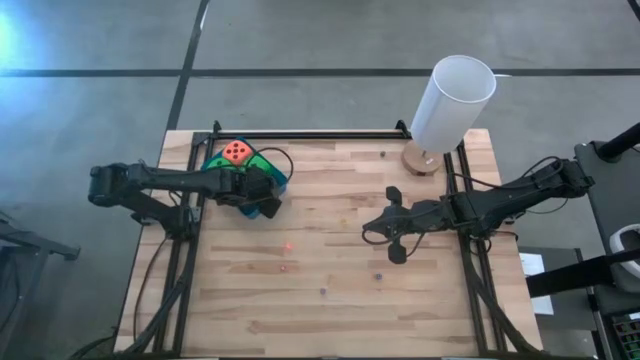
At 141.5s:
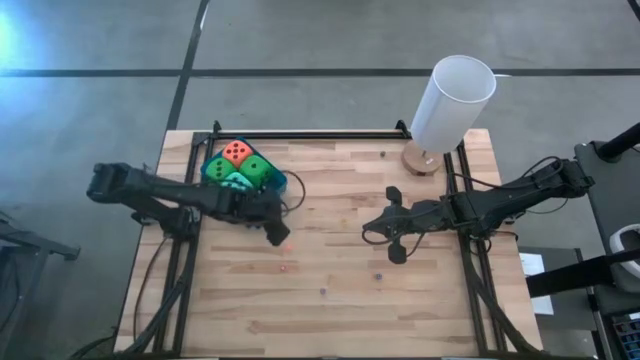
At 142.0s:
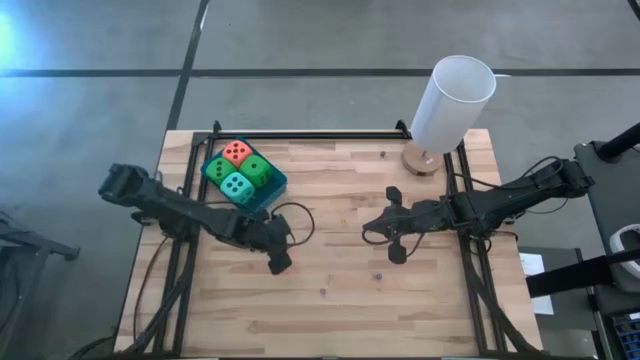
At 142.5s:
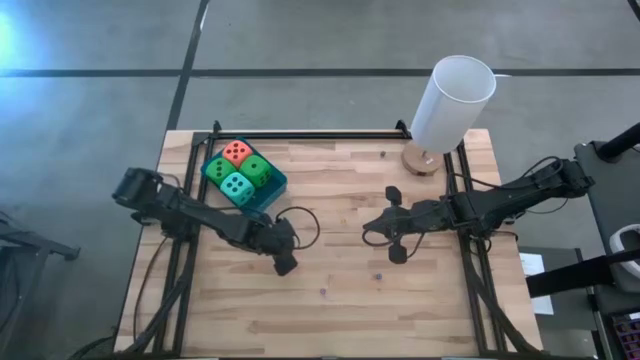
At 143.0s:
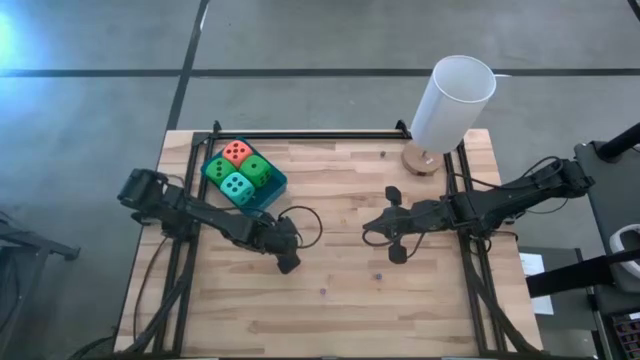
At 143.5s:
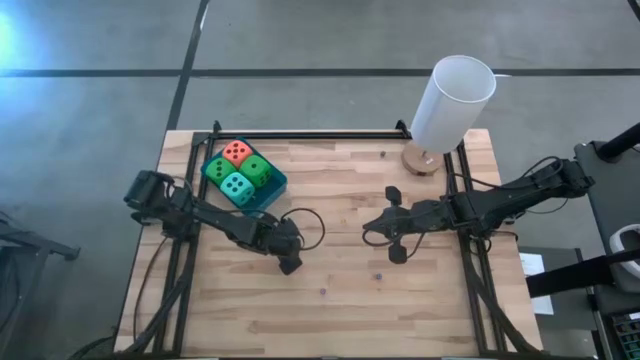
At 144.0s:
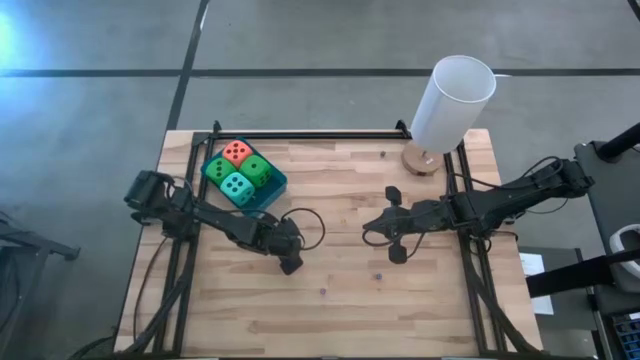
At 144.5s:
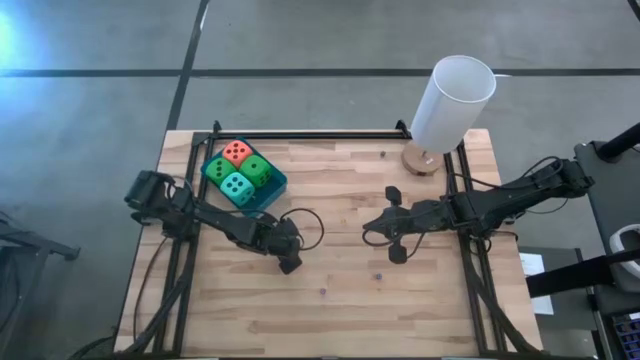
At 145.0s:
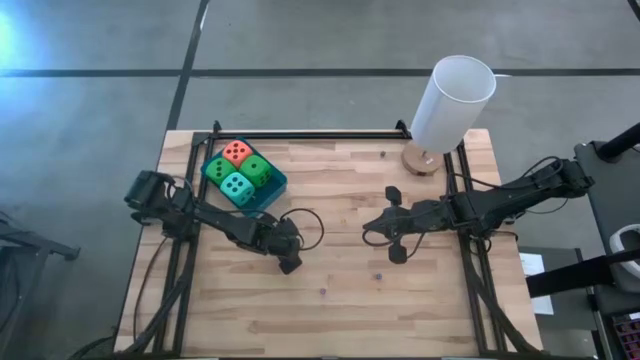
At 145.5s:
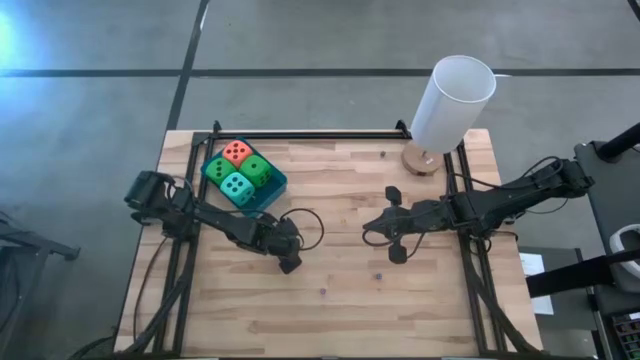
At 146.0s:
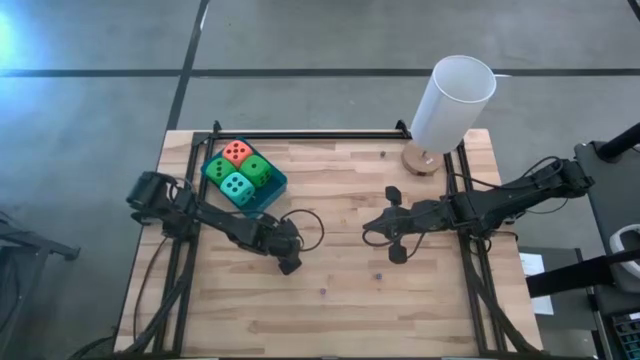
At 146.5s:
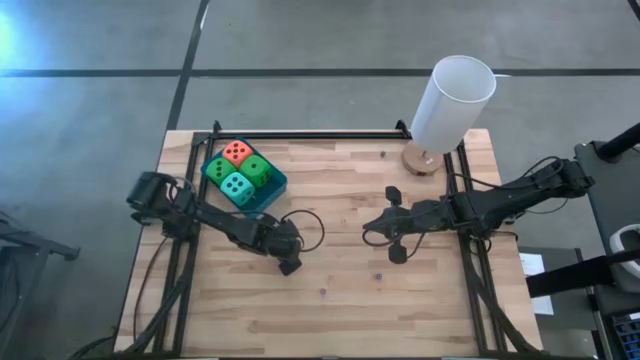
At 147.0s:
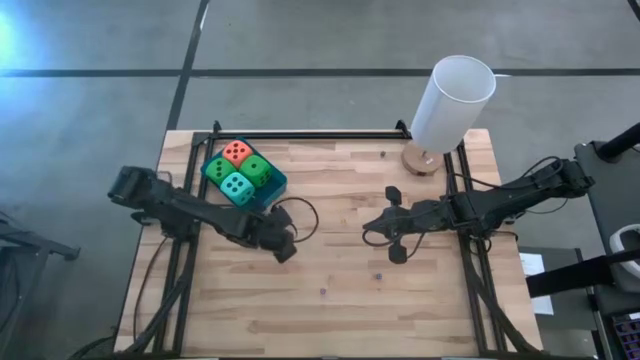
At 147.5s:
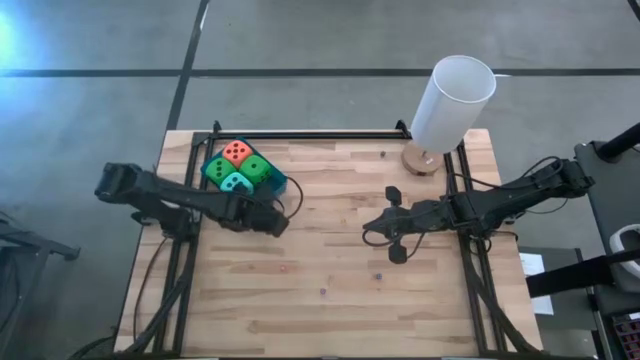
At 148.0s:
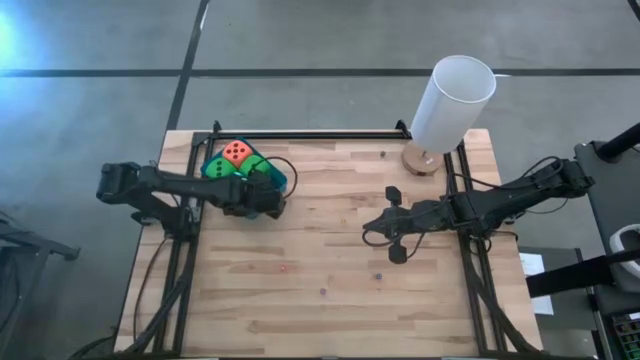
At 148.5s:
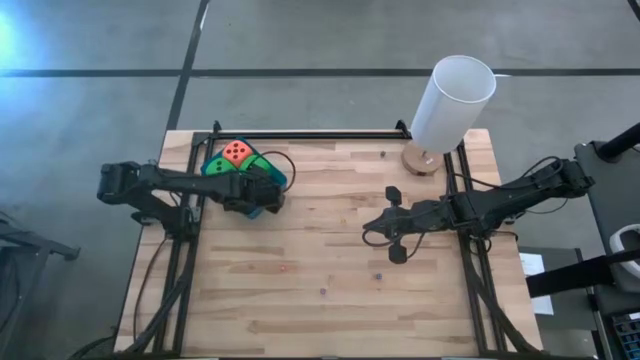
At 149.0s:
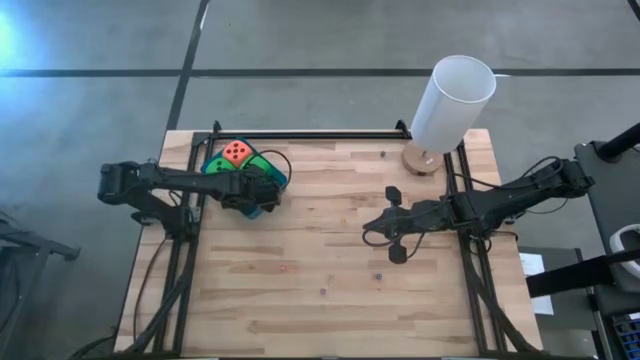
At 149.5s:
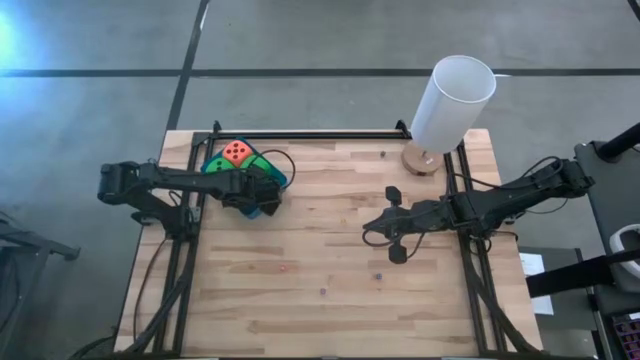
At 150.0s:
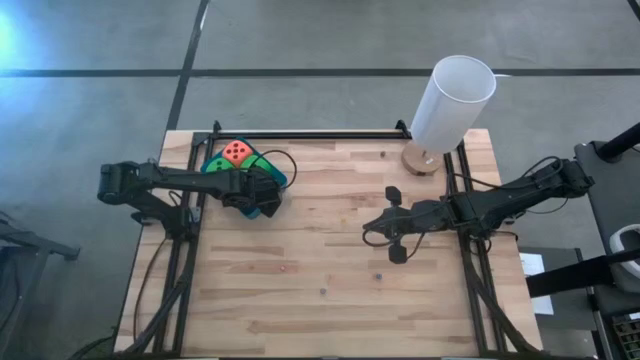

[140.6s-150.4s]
Task: Pick & Place Dice
Put the small orange dice into the blue bin

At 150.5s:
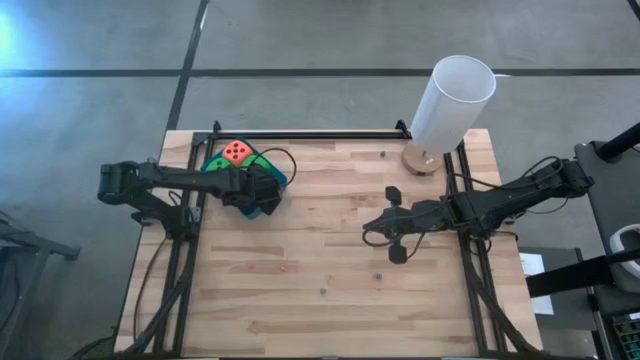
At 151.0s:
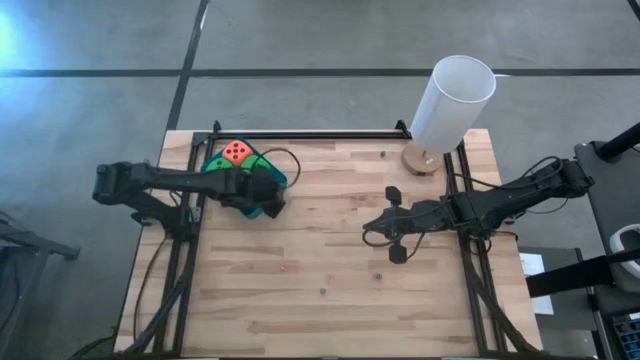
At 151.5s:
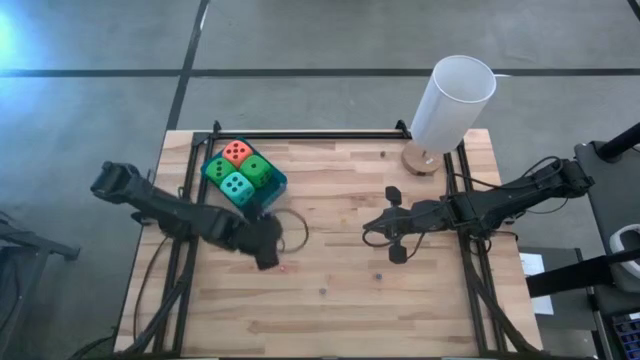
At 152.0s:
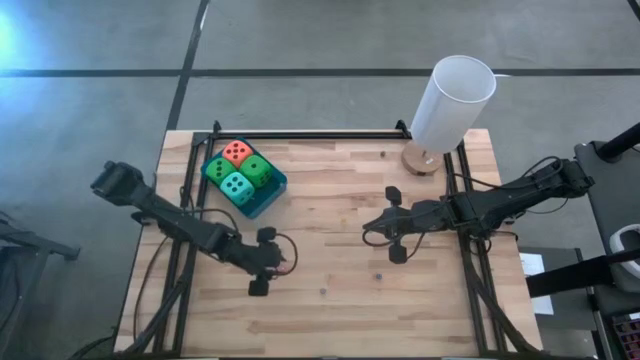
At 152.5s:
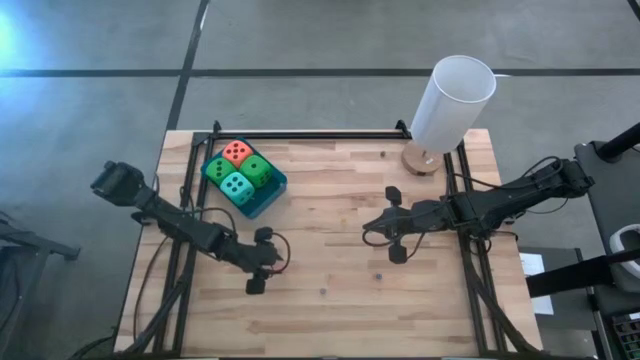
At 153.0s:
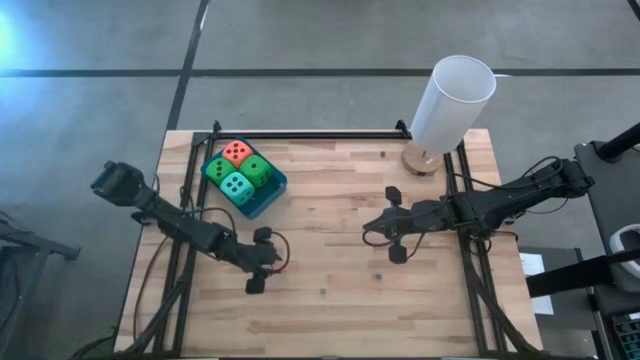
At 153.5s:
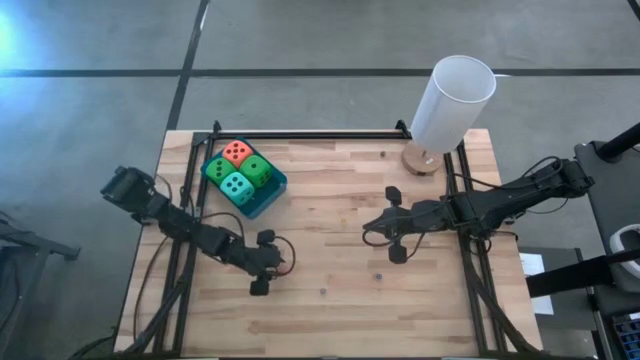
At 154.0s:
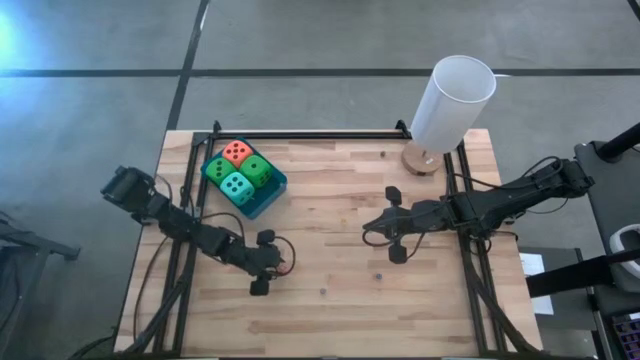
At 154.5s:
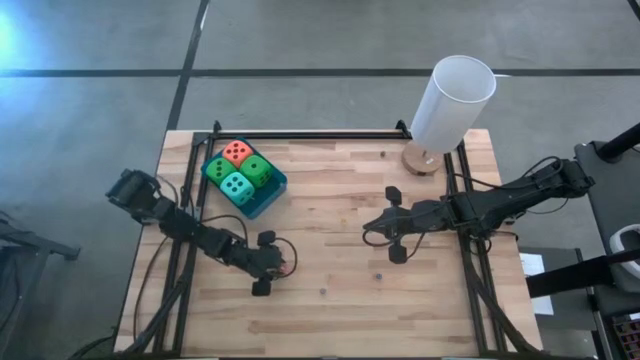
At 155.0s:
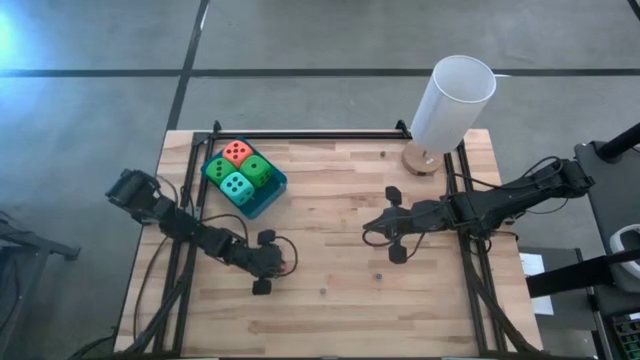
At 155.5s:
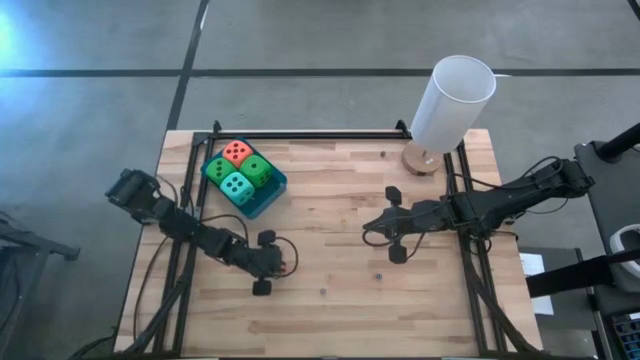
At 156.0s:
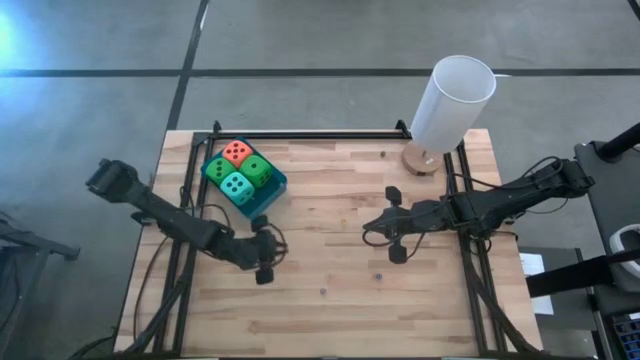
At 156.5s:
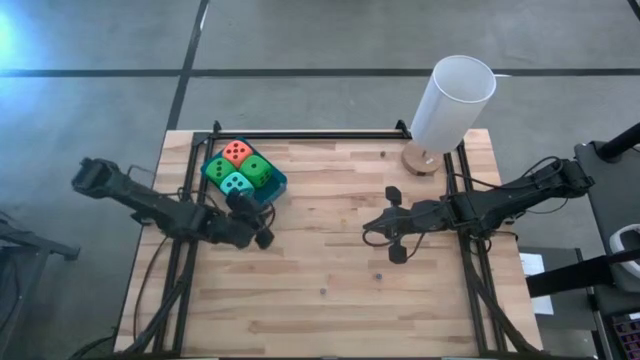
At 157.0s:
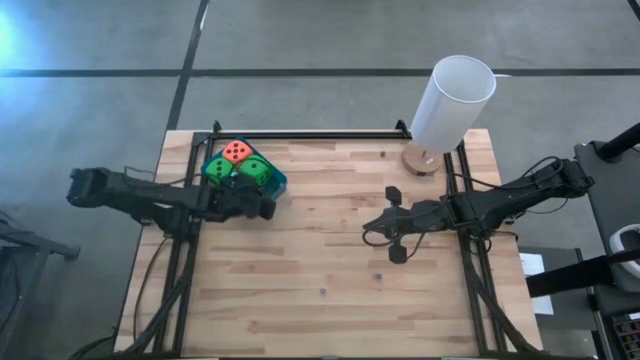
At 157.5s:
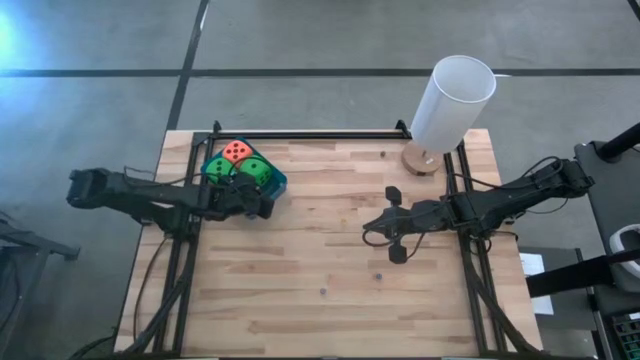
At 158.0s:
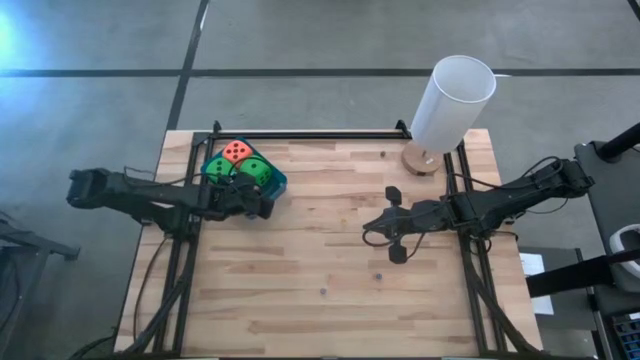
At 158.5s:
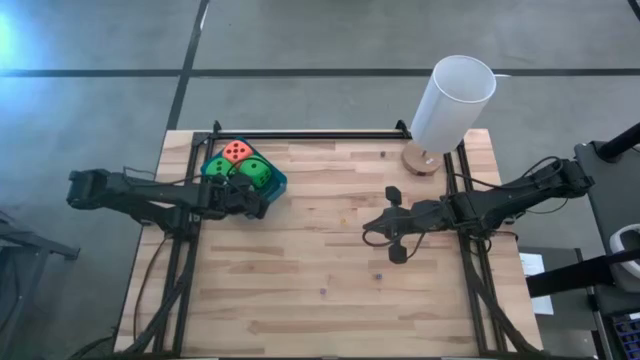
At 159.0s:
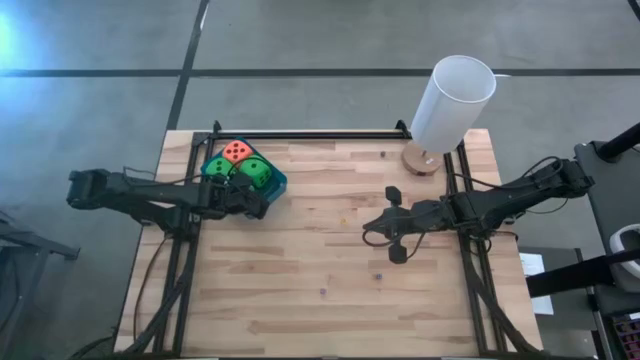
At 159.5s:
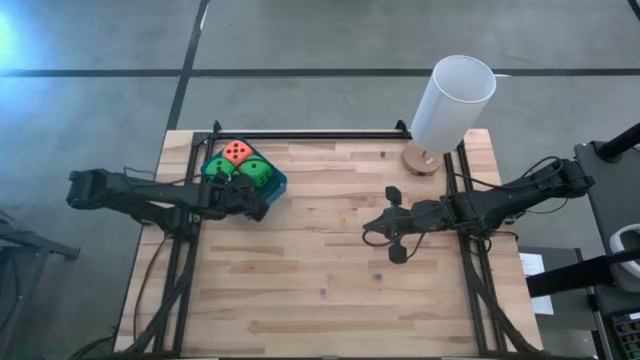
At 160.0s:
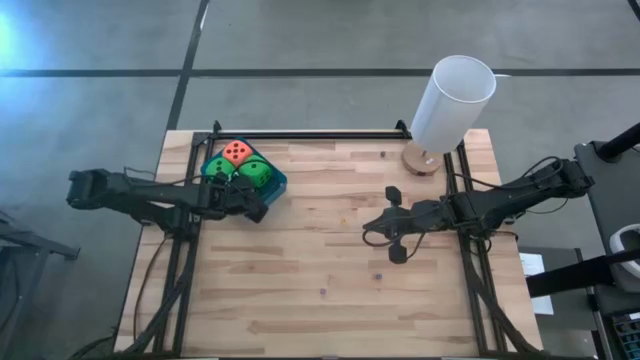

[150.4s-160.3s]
Put the small red dice into the blue bin

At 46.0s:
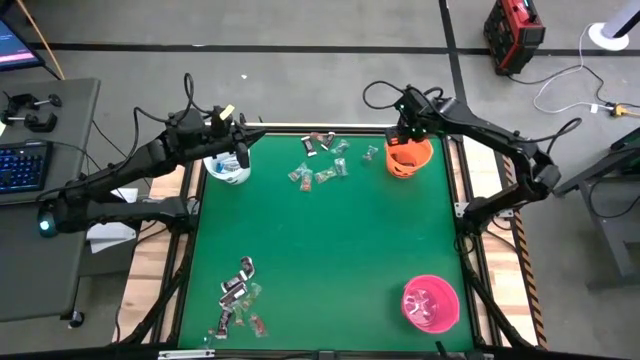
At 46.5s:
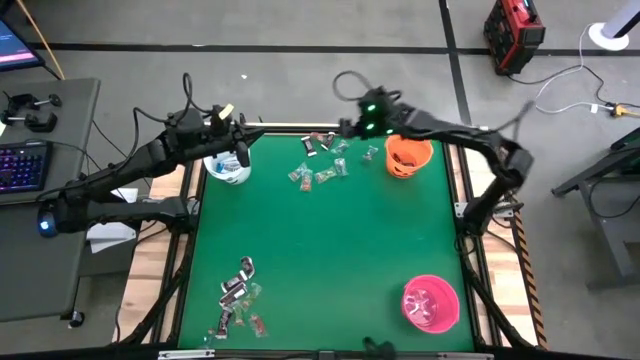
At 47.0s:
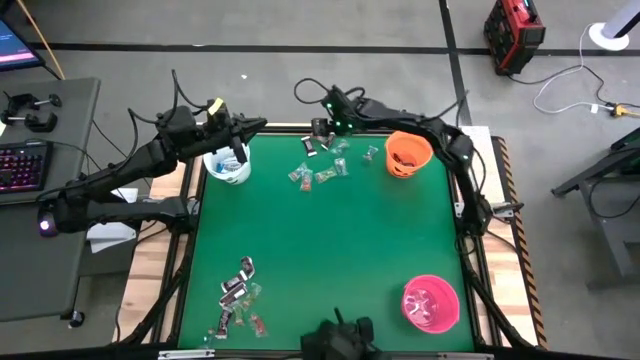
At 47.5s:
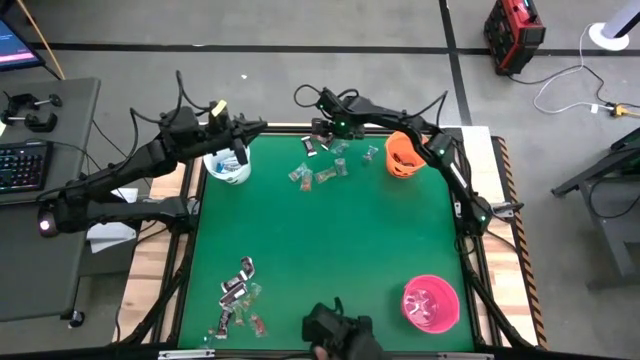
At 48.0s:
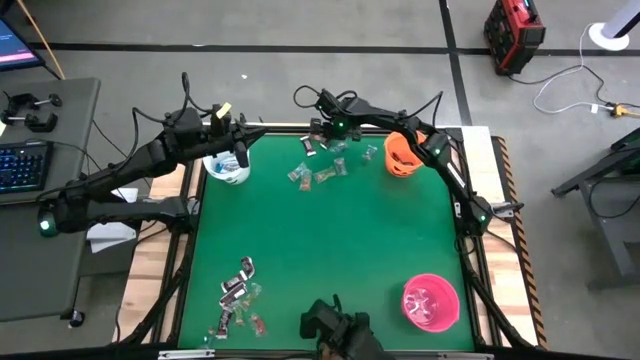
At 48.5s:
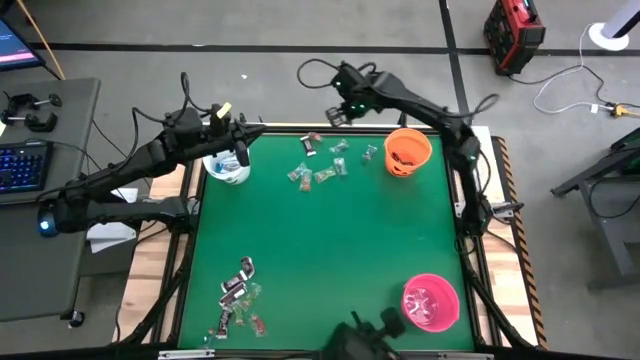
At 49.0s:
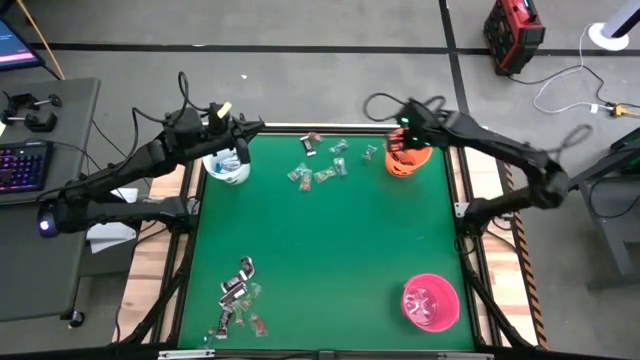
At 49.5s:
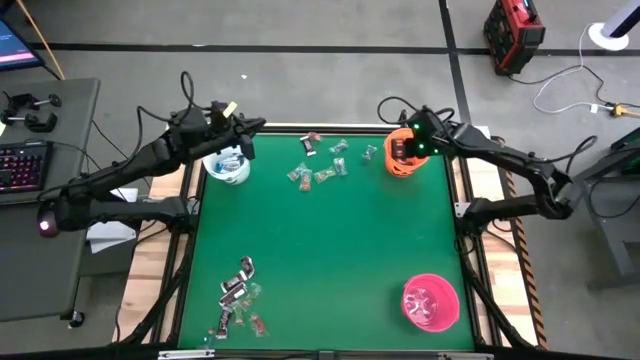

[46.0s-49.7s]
Task: Sort candy by brand, put in halloween buckets
Put the brown chocolate bar into the orange bucket
